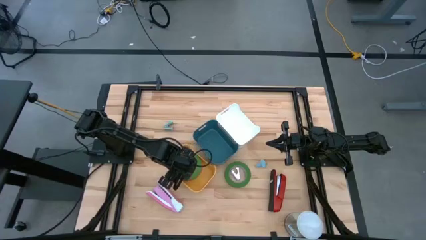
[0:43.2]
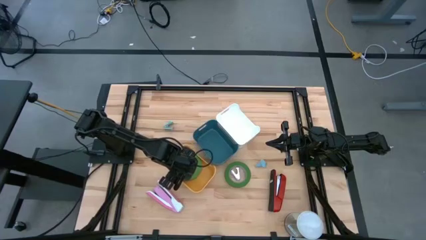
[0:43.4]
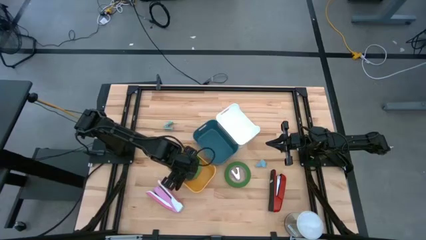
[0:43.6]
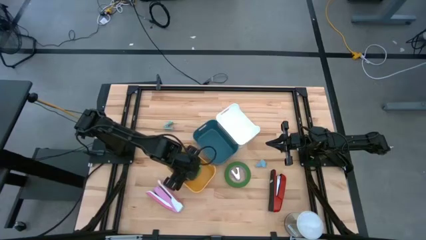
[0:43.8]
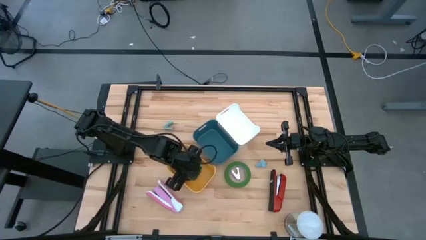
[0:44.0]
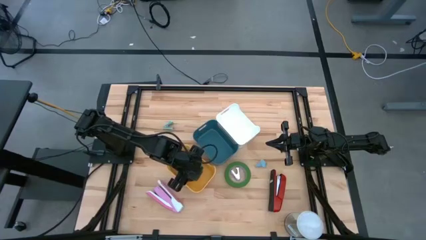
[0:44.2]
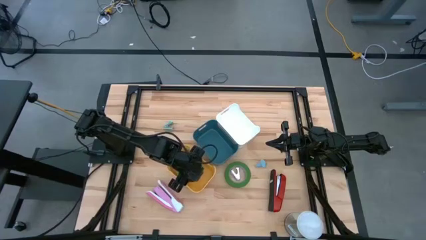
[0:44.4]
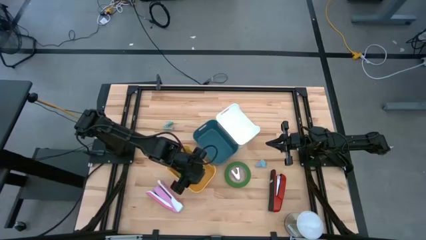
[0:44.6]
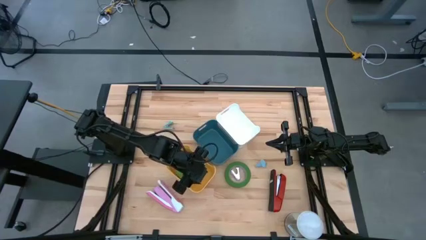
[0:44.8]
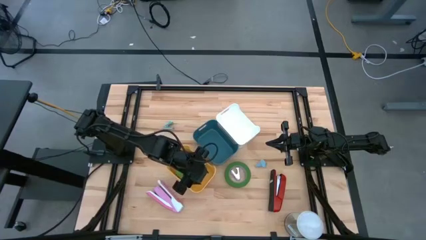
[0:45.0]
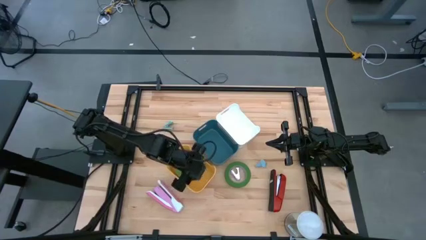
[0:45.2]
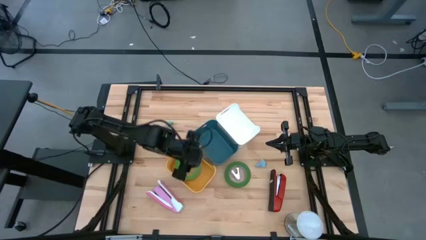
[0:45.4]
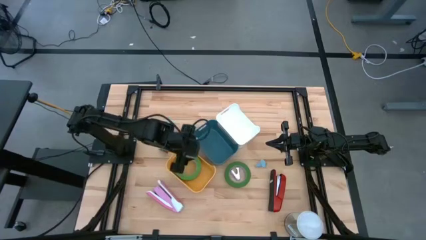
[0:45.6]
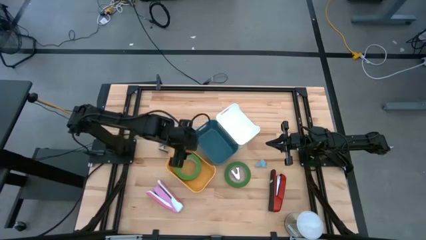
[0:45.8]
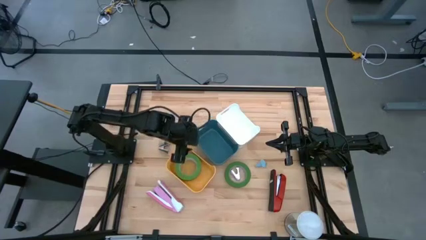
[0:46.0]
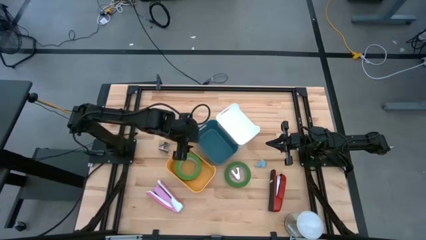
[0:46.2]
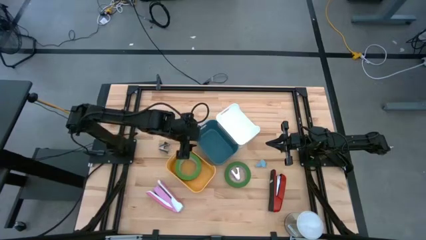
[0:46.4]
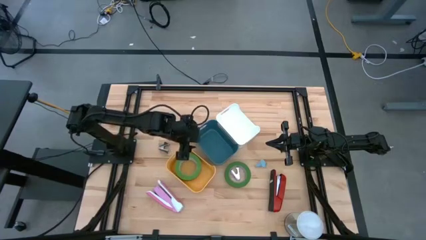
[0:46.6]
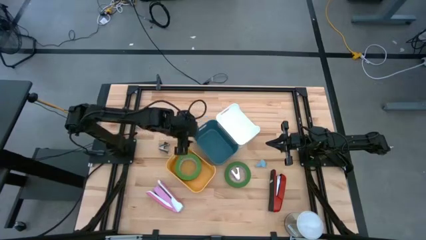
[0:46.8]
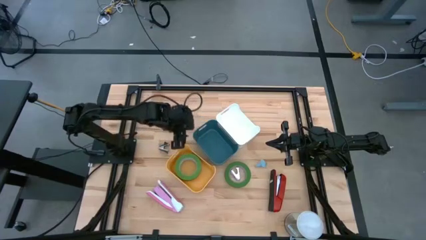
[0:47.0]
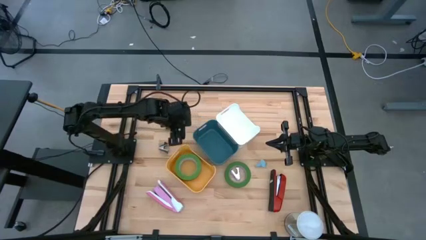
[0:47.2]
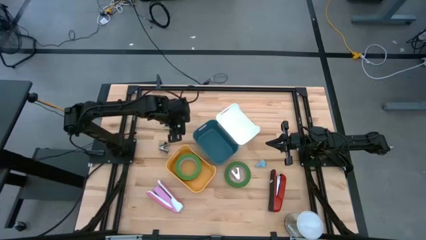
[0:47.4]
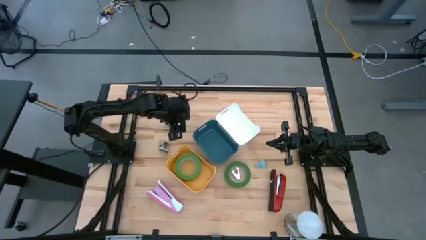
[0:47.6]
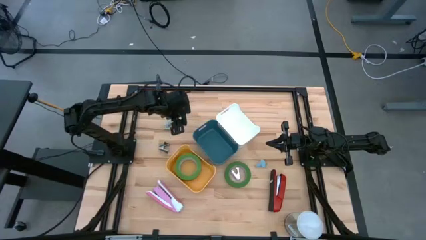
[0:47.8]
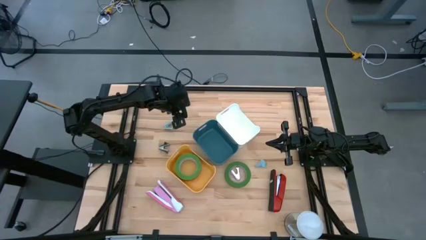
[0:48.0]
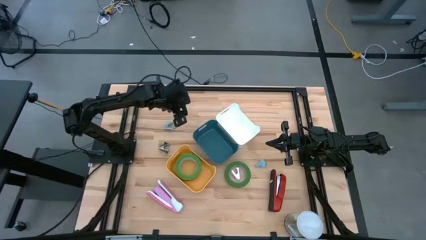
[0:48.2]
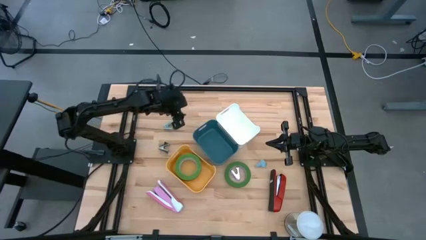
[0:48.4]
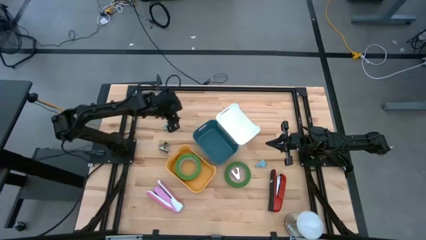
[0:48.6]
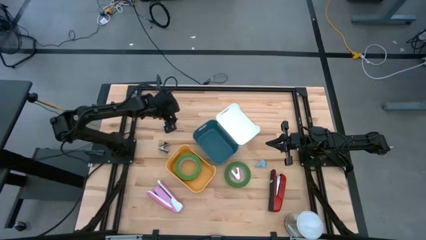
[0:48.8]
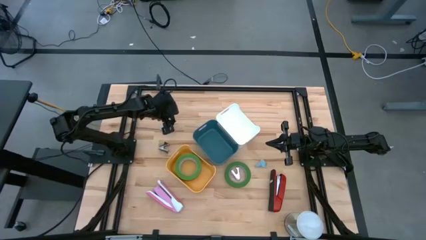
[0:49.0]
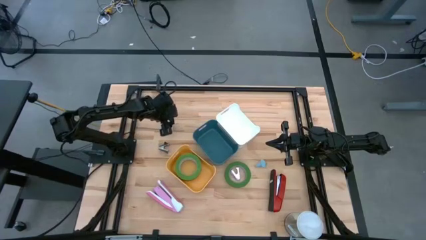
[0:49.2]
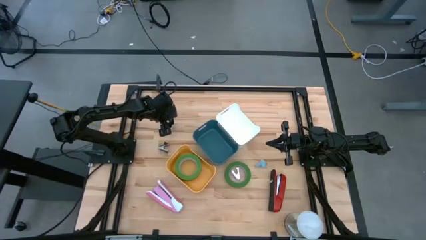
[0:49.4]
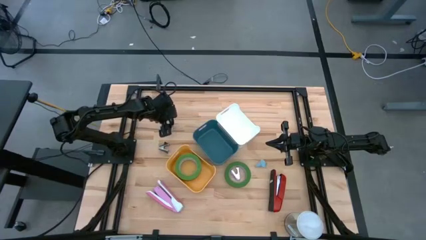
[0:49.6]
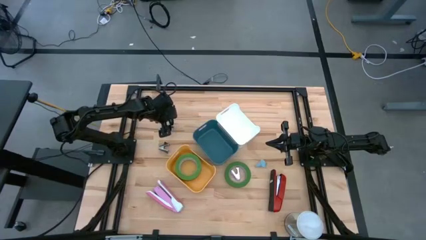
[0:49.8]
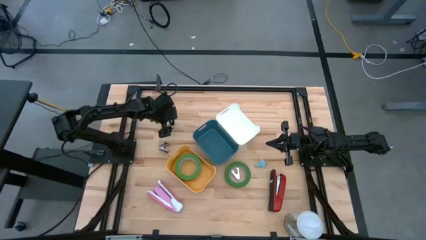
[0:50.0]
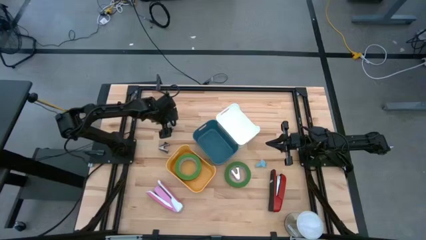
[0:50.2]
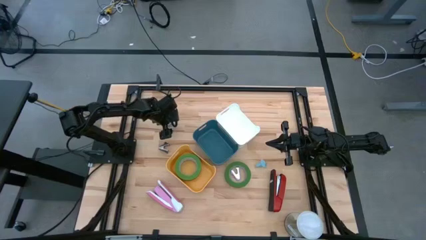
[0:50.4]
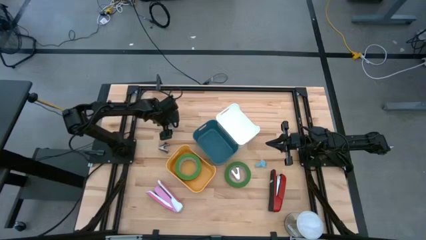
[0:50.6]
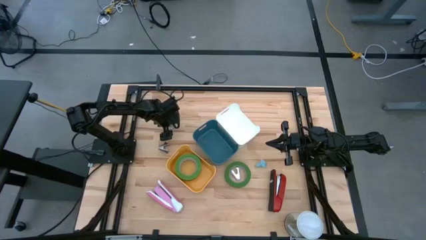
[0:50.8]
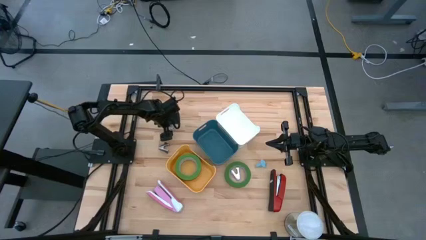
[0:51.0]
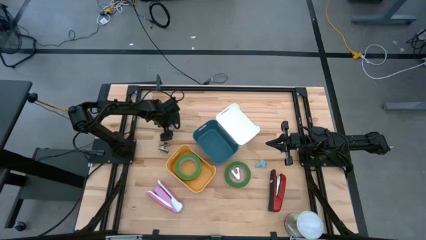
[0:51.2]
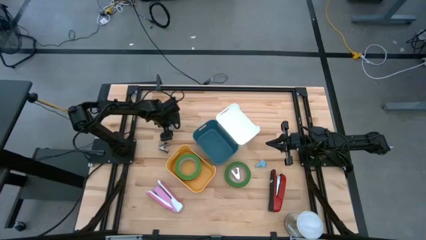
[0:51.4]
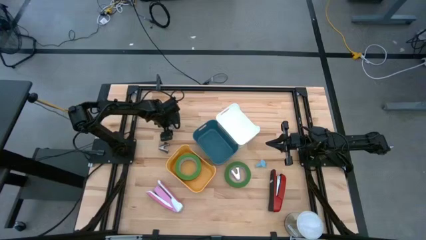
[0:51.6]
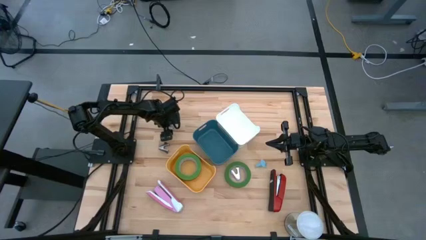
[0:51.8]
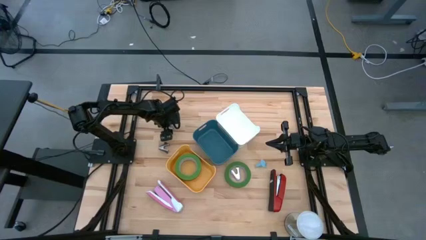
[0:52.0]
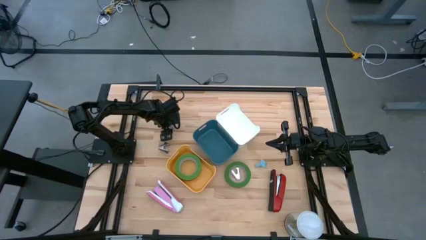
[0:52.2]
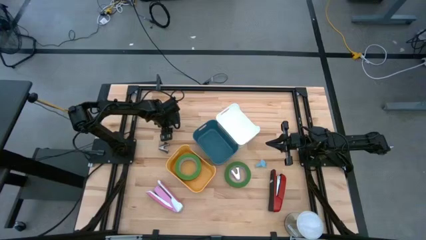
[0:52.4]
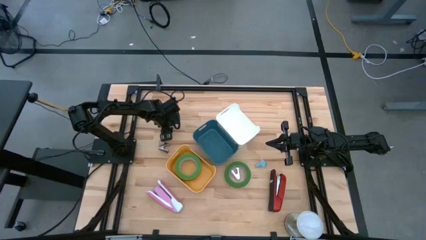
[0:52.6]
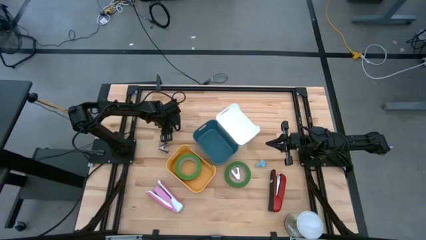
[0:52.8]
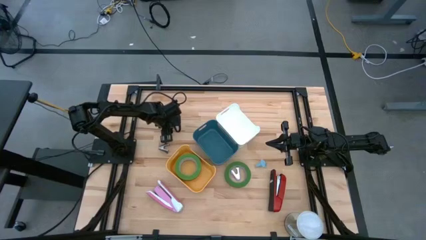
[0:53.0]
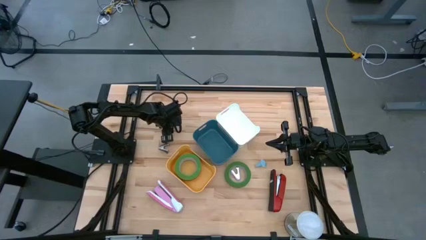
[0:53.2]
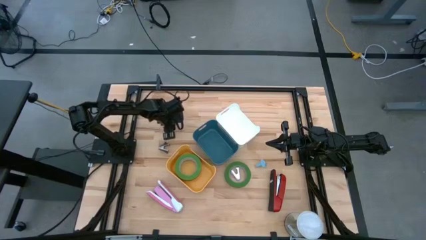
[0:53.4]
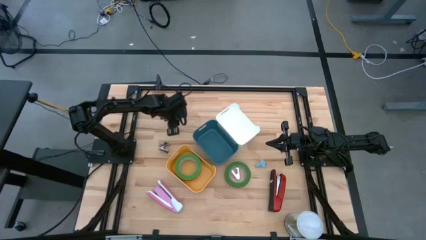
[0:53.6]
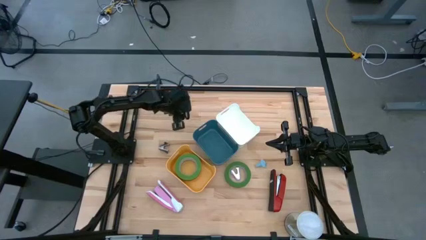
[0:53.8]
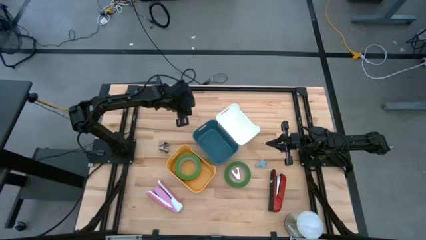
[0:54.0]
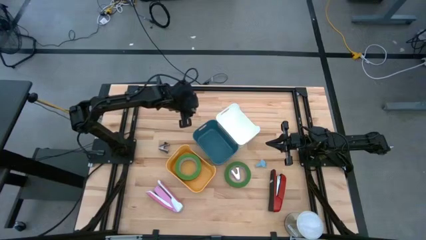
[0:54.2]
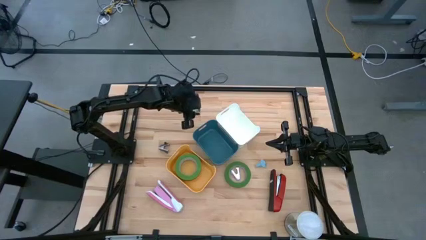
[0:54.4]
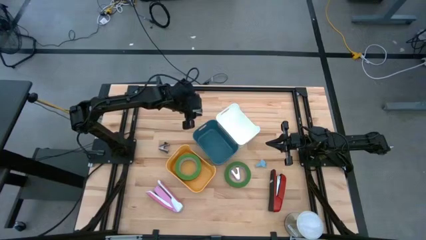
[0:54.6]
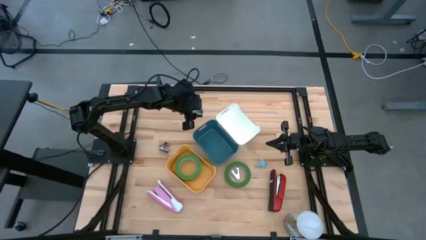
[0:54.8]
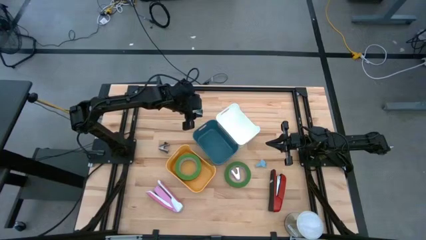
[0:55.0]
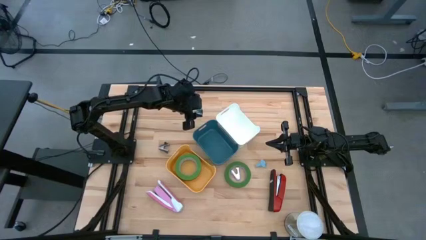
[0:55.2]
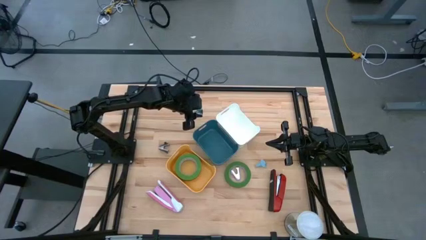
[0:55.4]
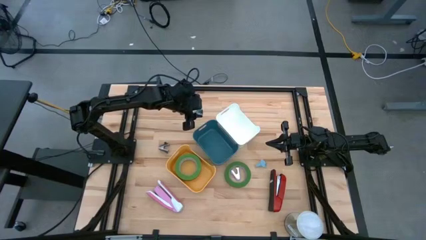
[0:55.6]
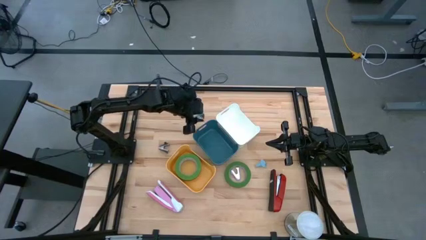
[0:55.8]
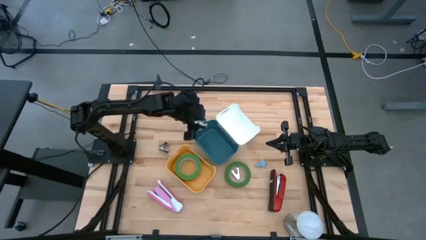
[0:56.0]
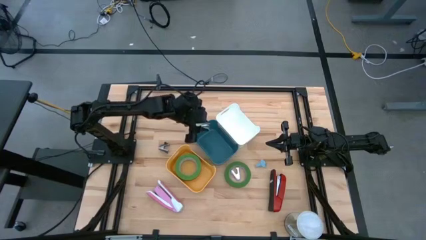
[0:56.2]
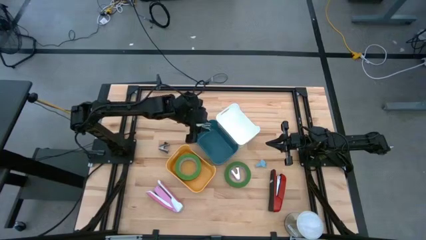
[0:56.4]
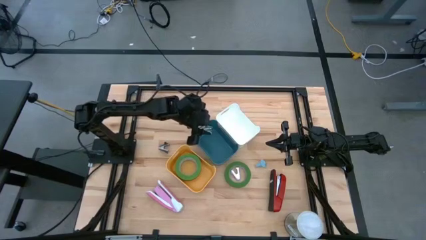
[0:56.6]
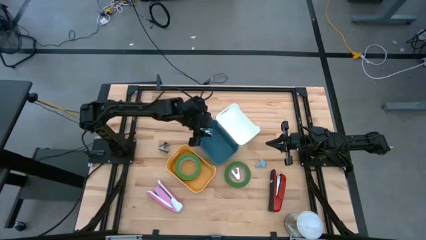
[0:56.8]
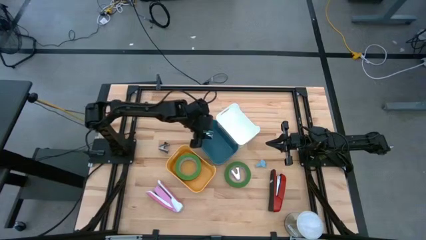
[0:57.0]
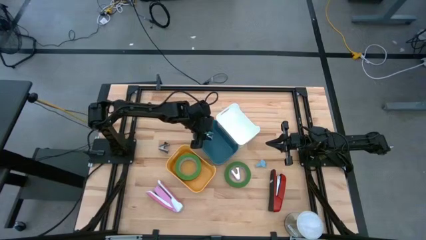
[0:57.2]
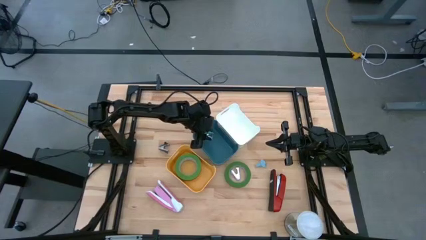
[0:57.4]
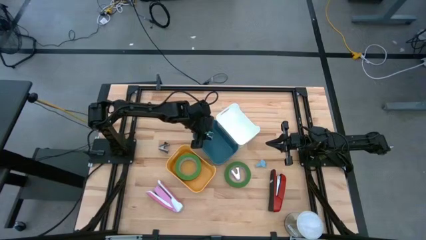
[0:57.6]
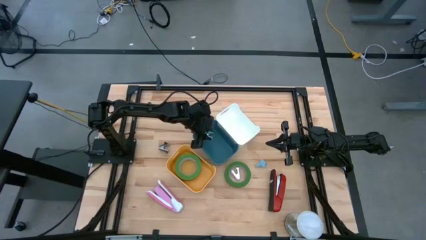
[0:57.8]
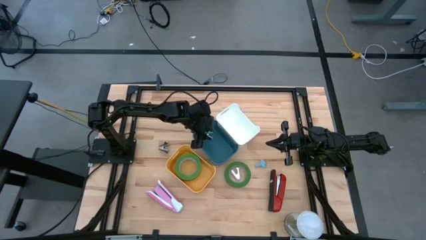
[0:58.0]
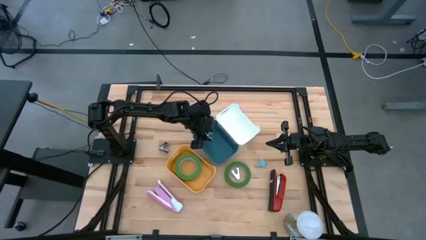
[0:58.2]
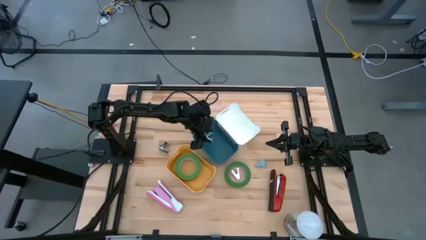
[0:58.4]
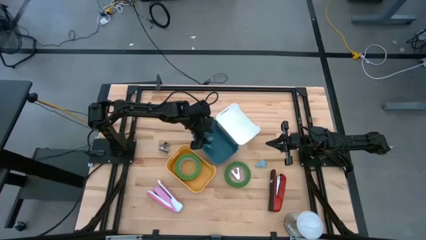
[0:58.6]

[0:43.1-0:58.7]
Task: Pick and place Stapler, Stapler remover, tape
Put the top light blue staple remover into the blue bin
